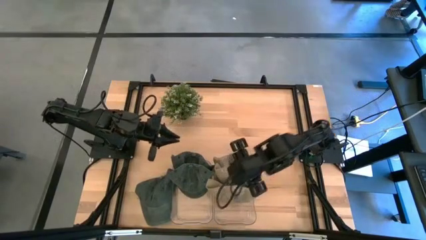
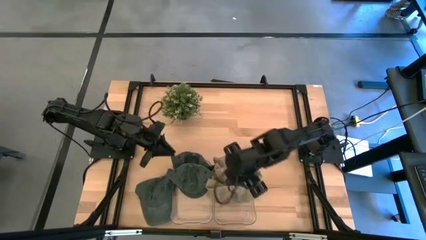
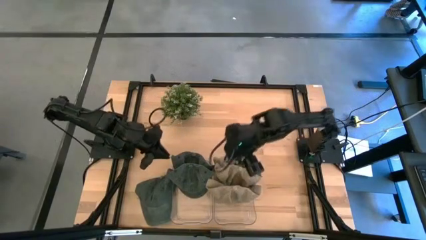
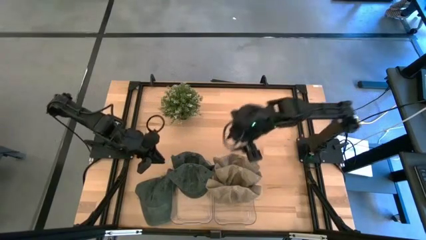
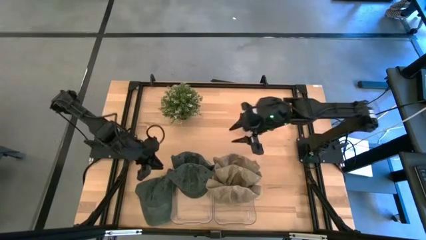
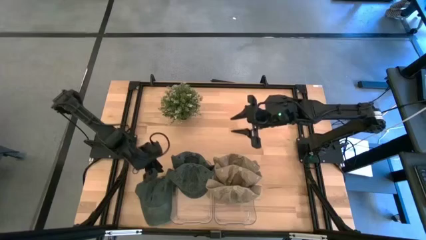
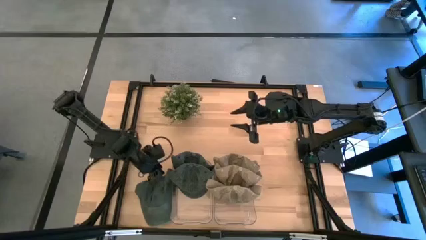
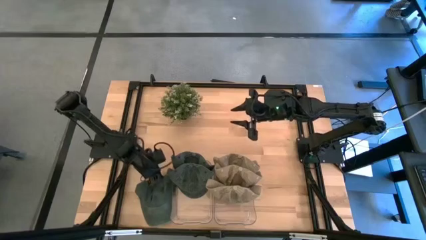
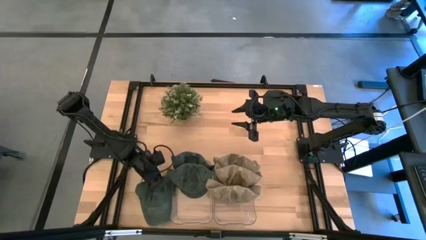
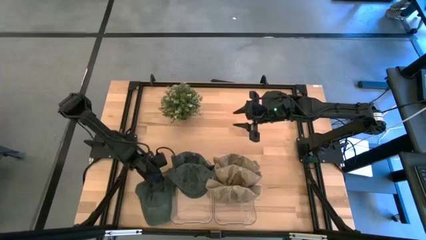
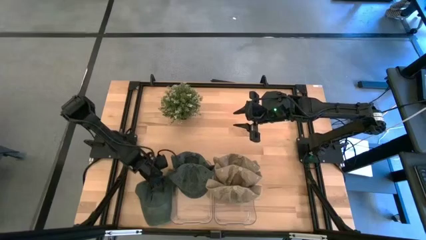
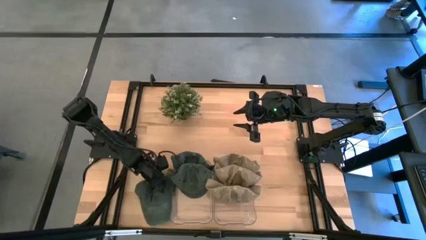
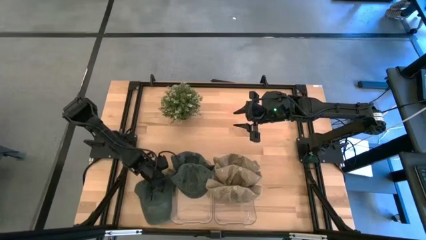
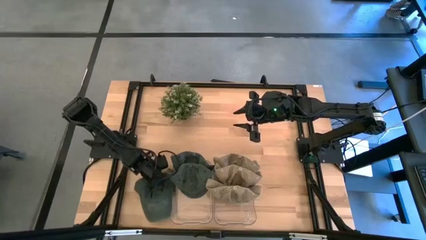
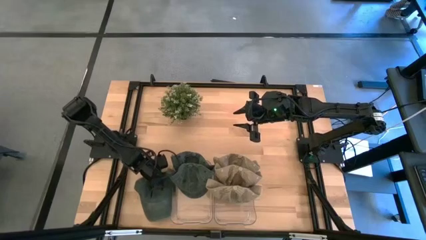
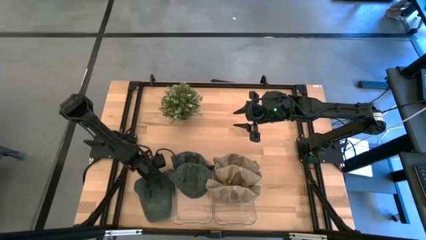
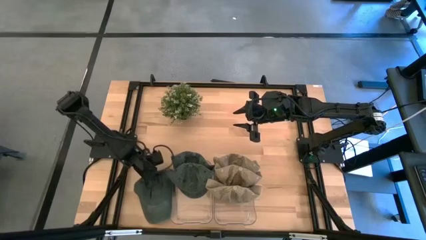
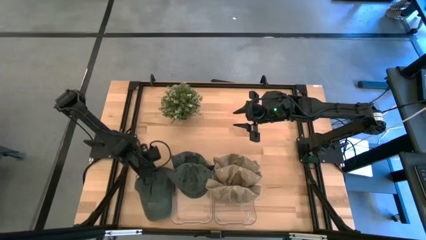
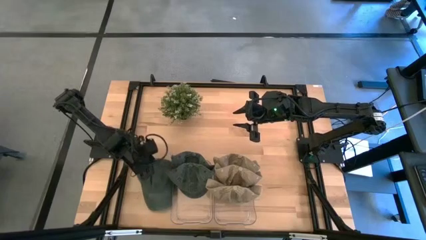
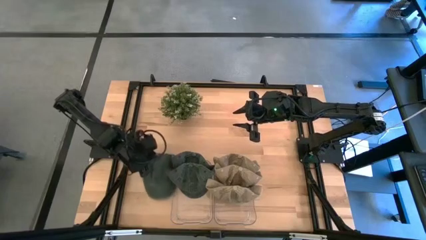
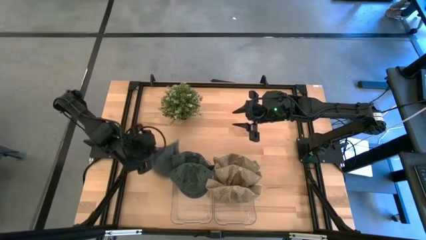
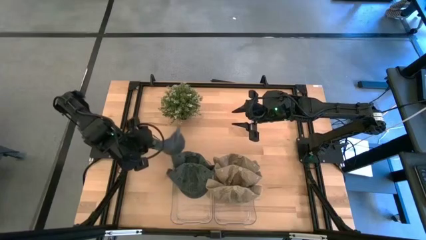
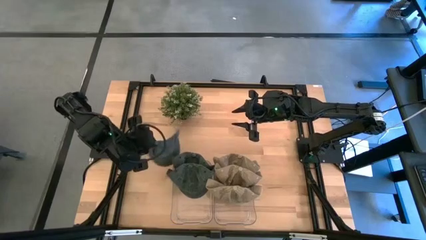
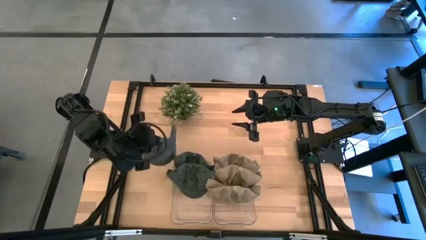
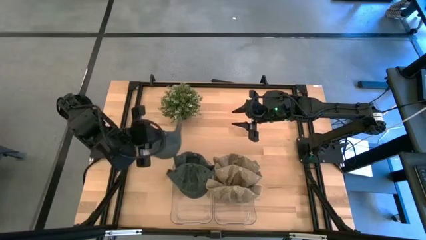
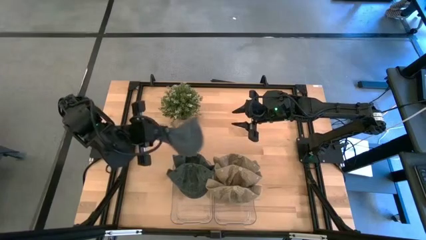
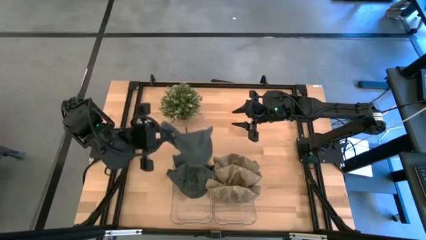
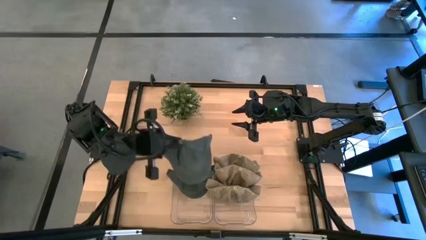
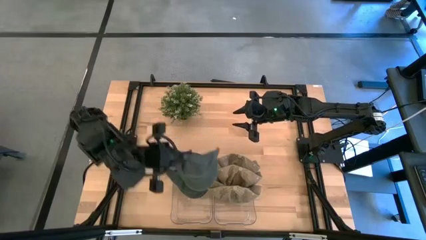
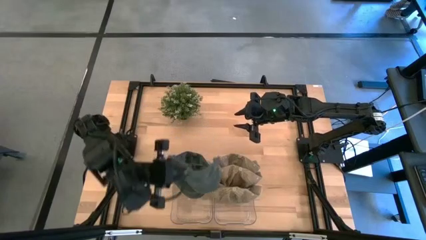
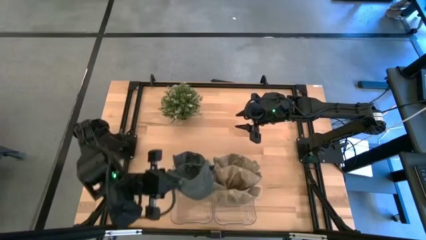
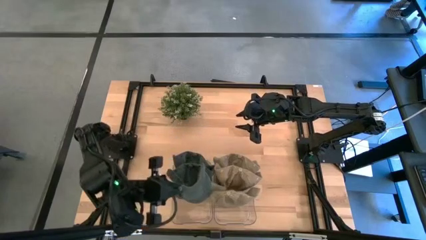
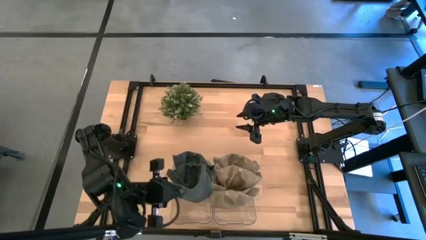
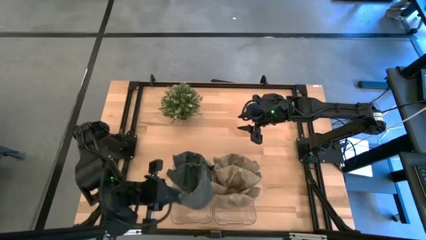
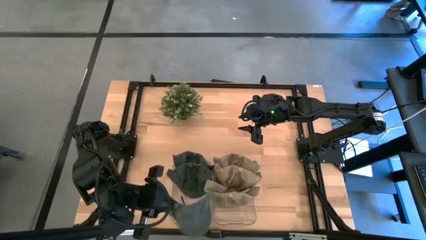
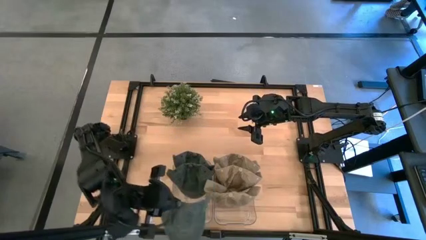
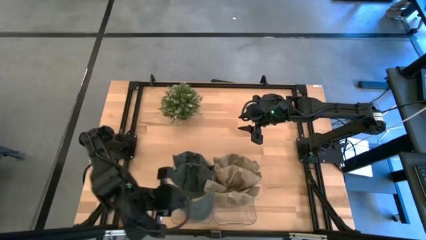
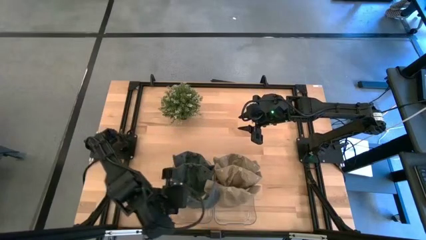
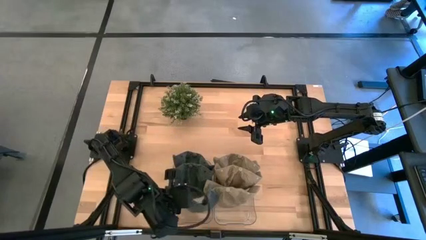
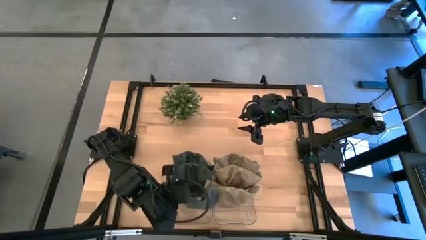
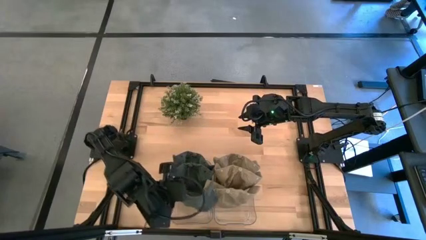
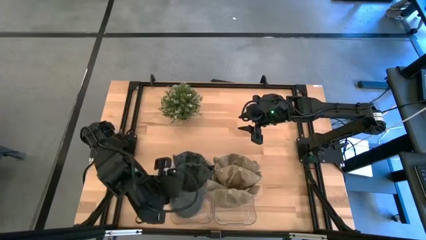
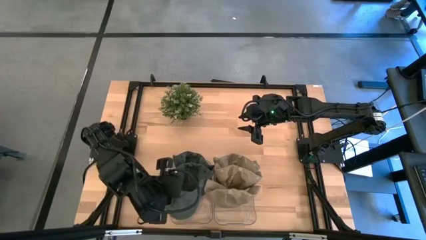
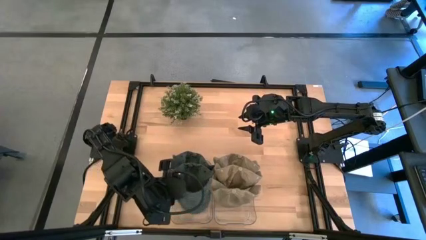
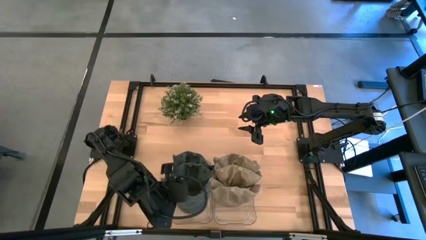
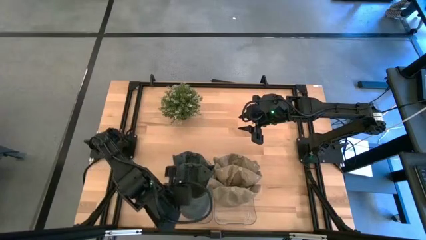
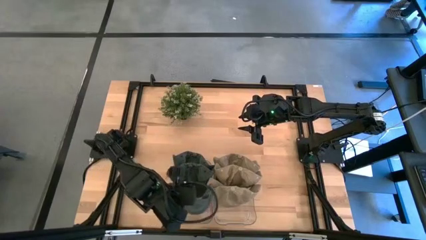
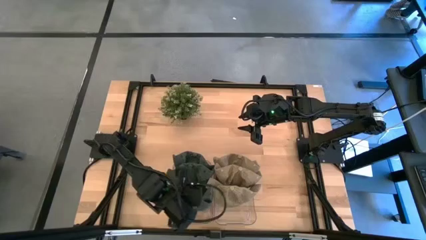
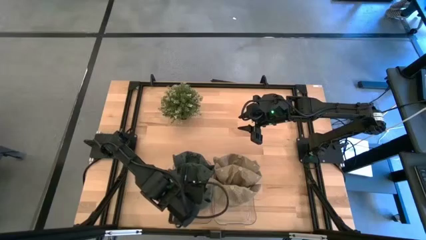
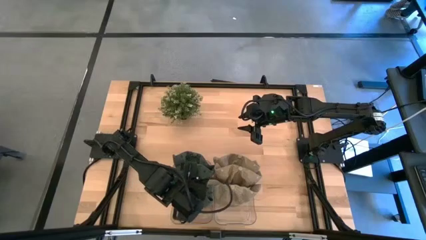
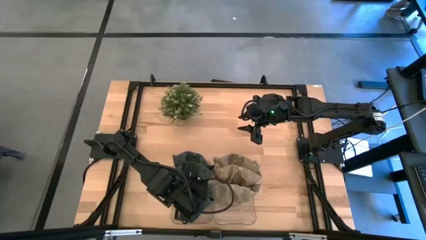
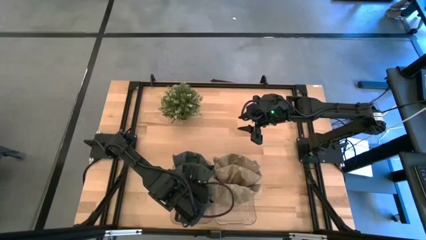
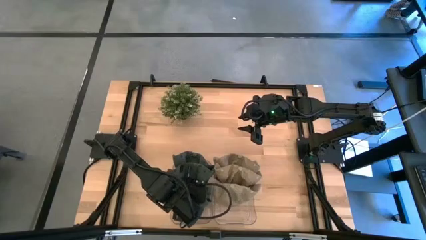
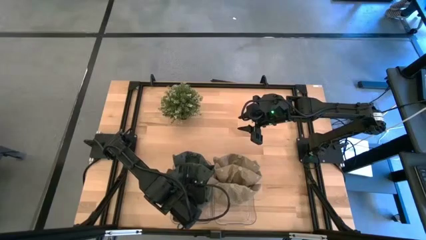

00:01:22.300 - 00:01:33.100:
Task: Pick & Place hat
Put the black cap into the left transparent bin

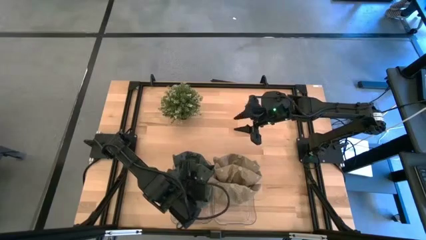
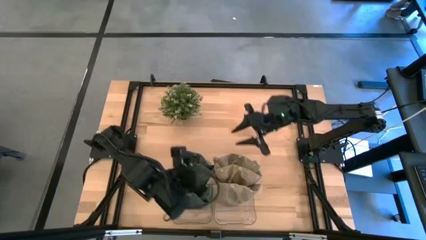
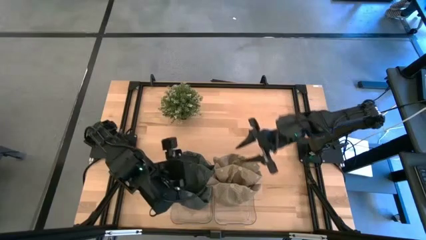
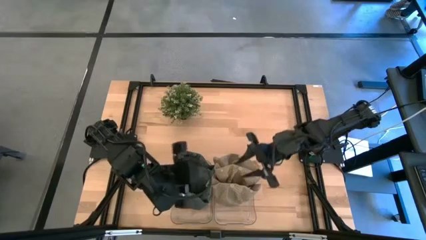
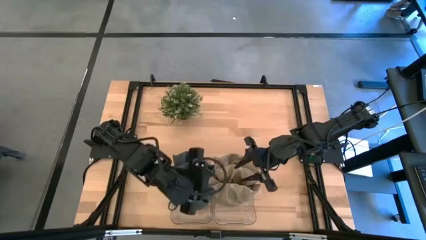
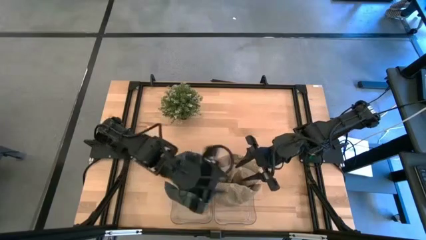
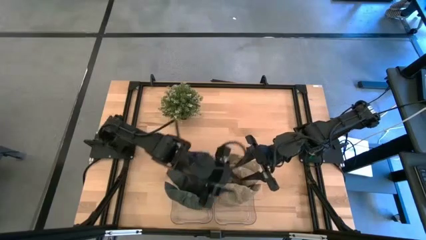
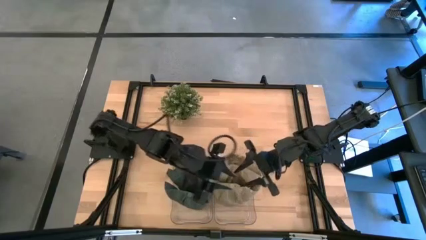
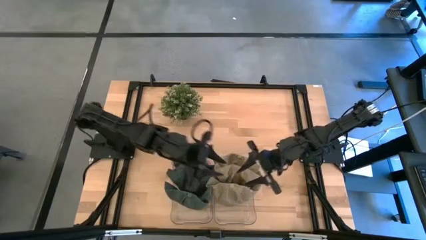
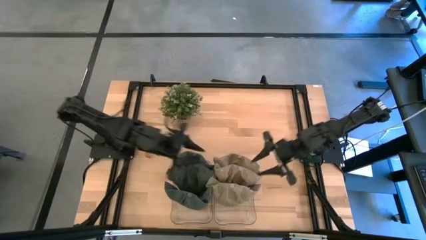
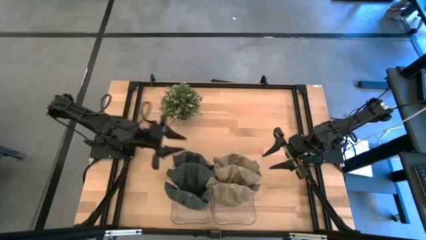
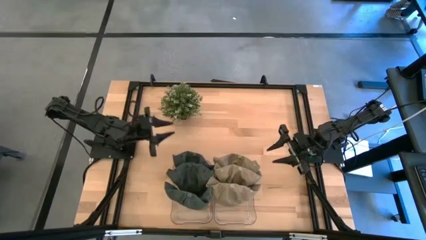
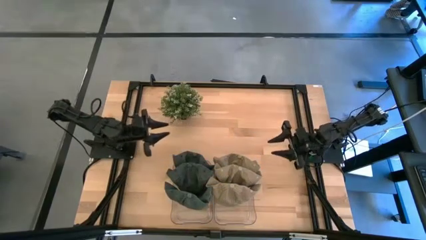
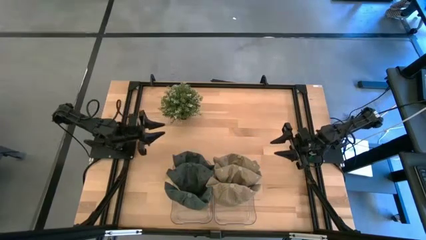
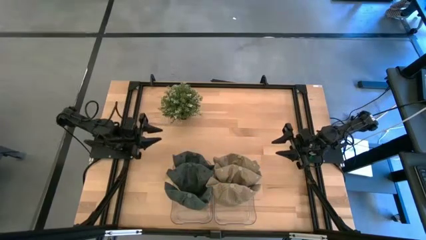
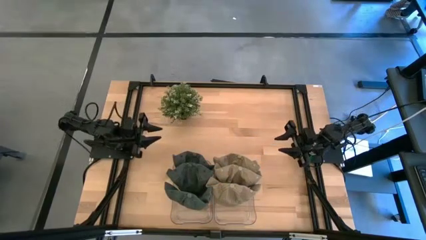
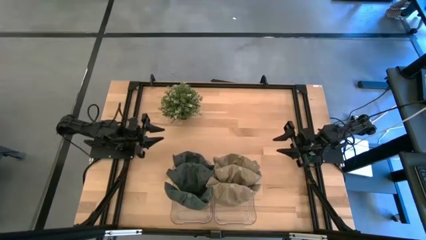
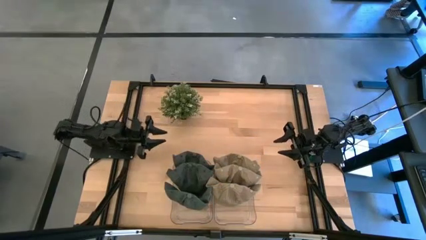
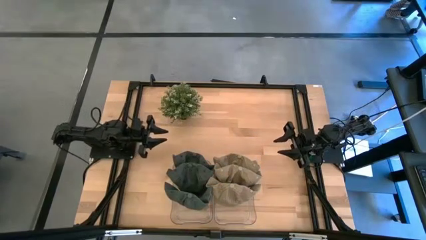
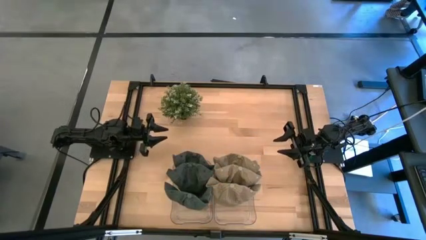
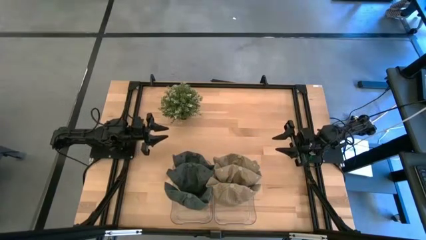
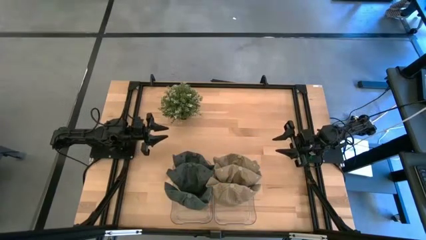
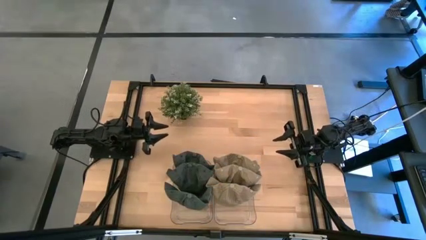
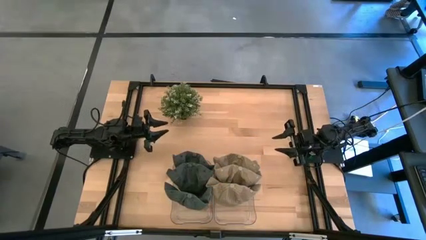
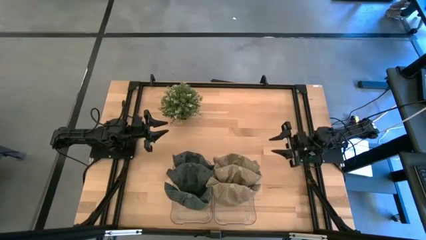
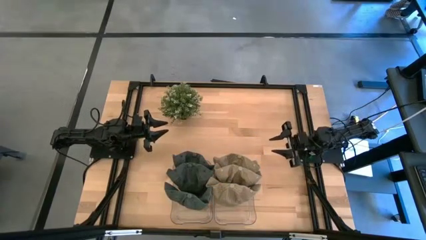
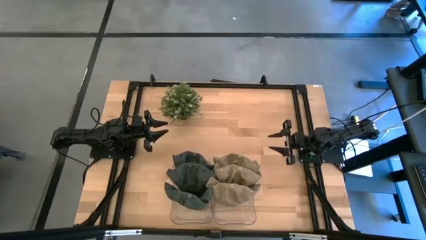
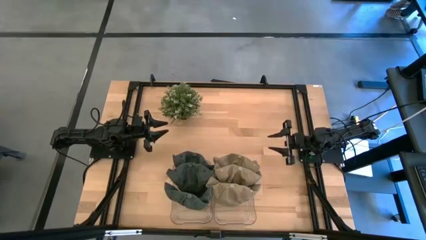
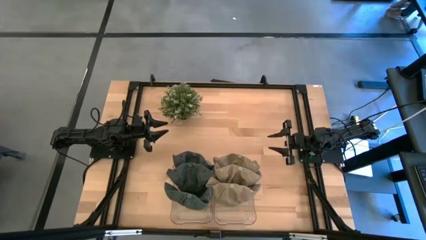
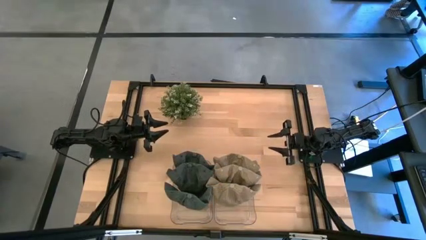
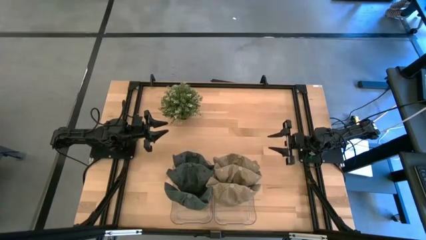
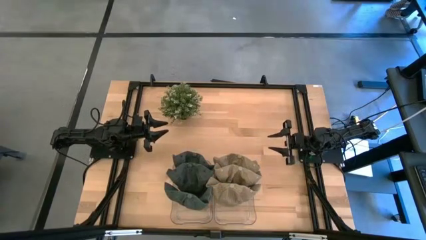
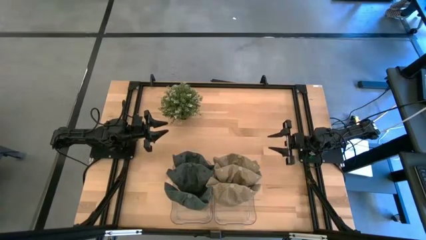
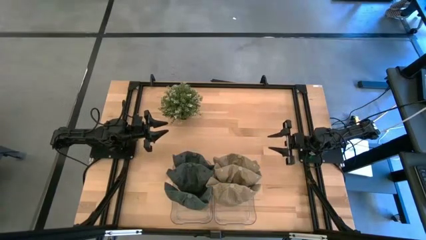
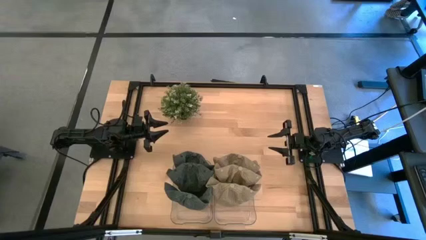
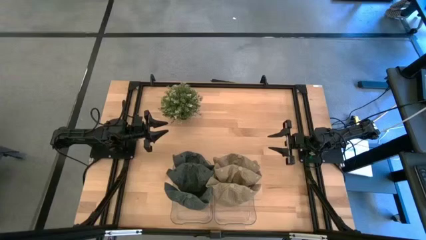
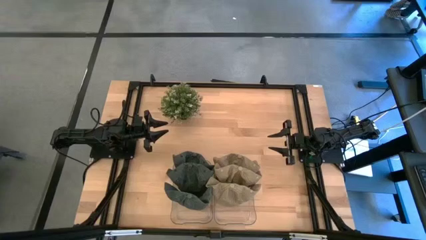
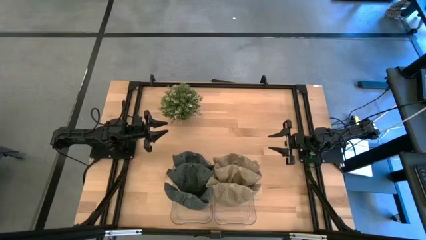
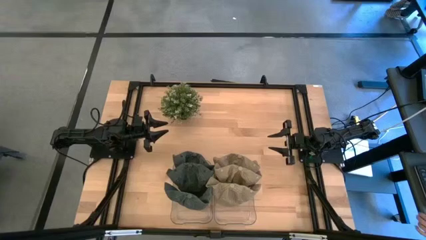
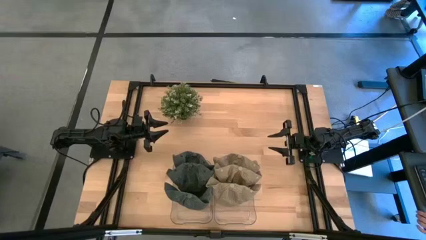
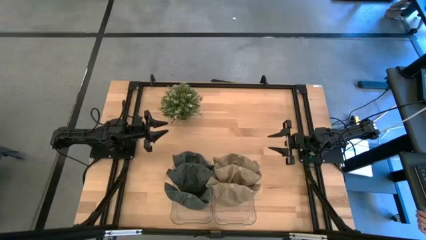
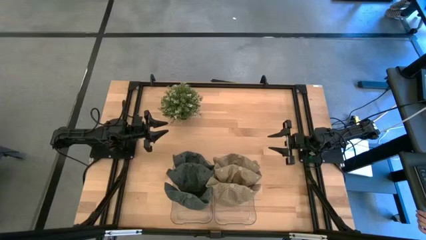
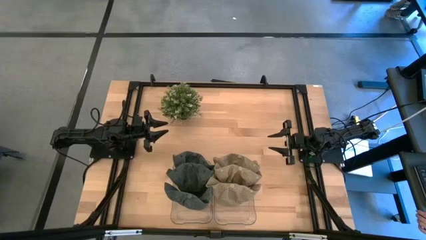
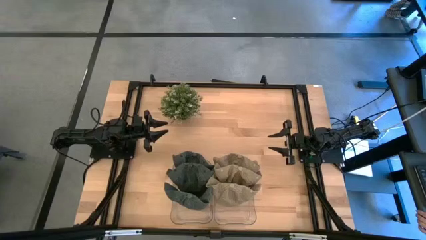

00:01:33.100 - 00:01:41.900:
Return to Home Position
